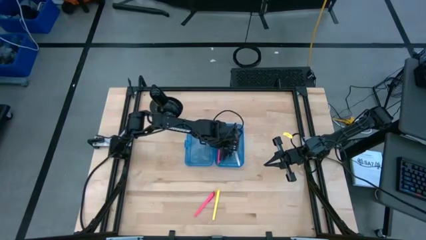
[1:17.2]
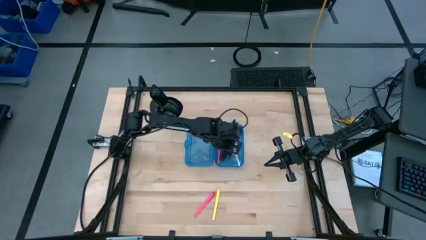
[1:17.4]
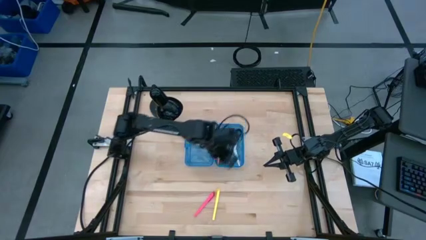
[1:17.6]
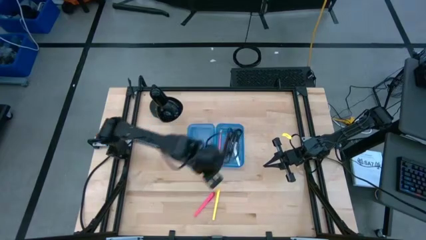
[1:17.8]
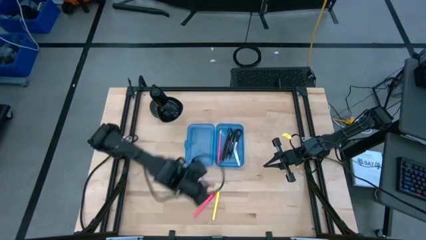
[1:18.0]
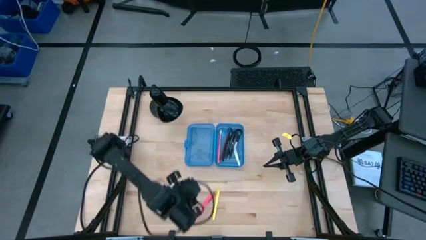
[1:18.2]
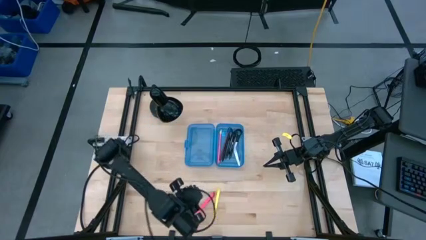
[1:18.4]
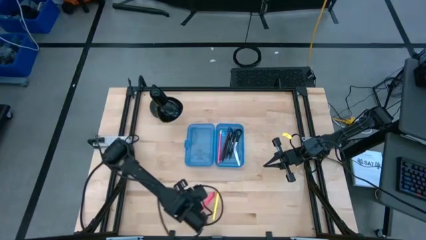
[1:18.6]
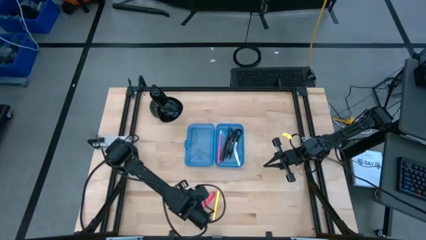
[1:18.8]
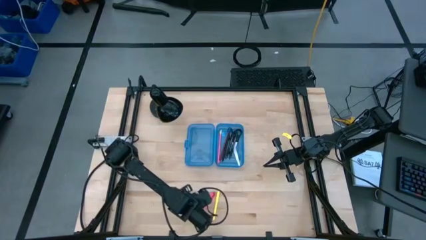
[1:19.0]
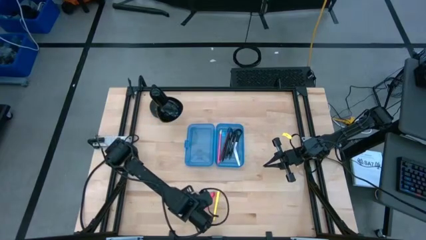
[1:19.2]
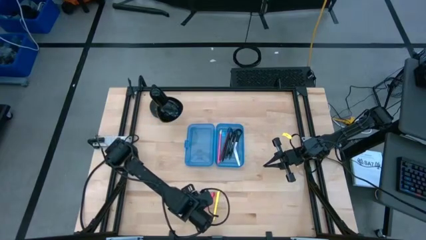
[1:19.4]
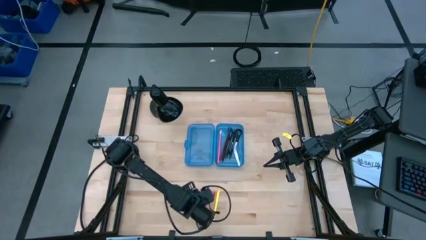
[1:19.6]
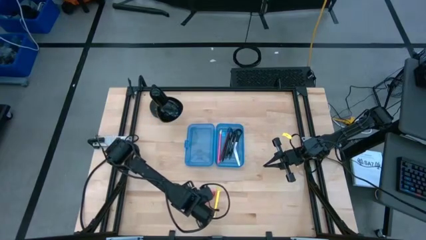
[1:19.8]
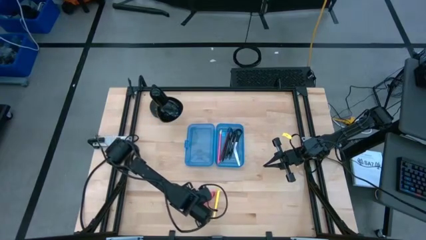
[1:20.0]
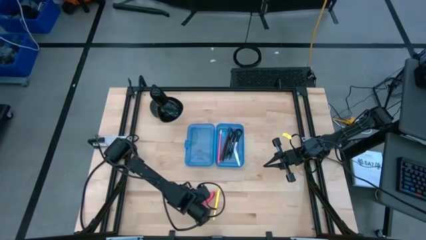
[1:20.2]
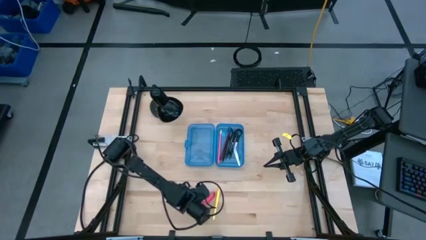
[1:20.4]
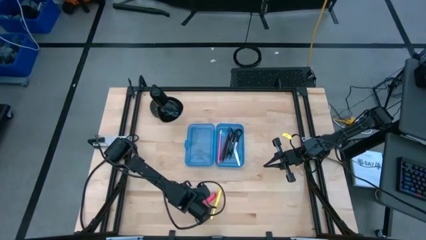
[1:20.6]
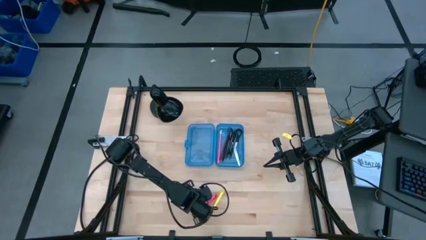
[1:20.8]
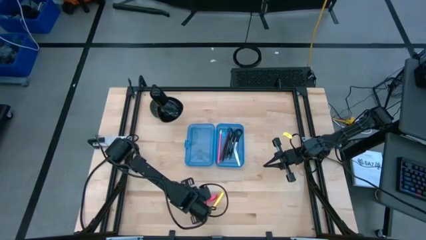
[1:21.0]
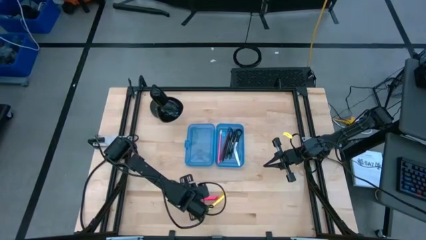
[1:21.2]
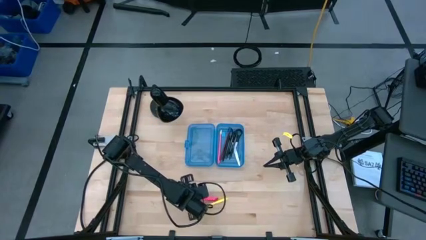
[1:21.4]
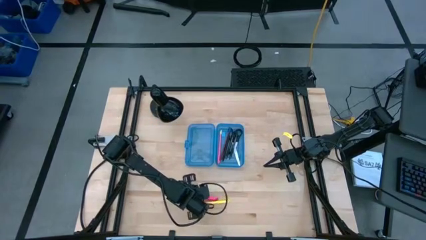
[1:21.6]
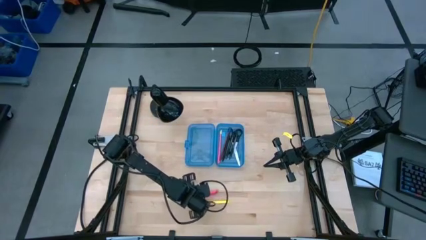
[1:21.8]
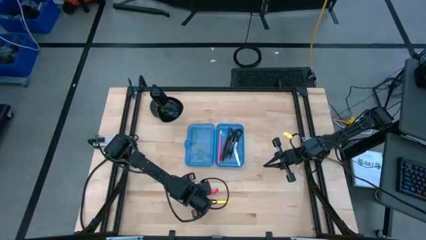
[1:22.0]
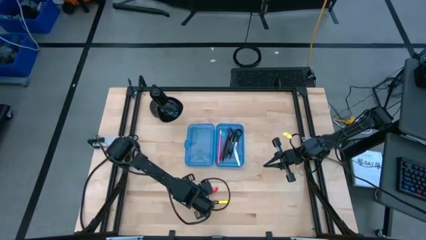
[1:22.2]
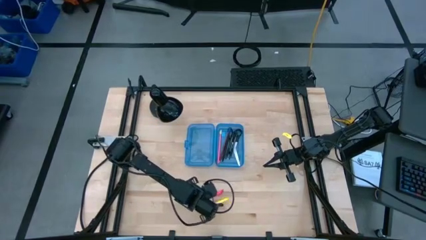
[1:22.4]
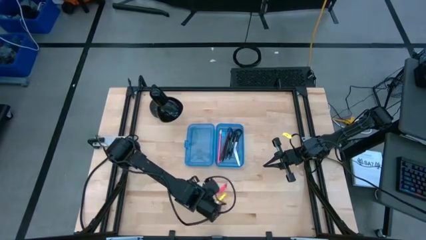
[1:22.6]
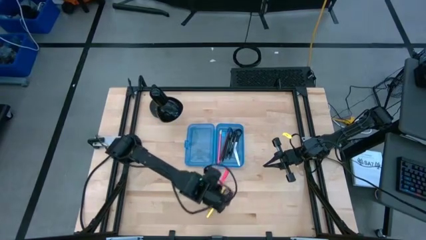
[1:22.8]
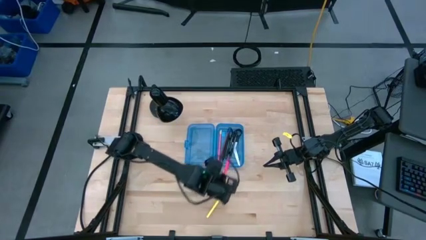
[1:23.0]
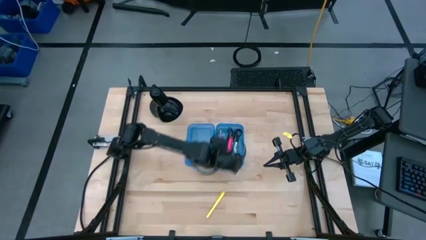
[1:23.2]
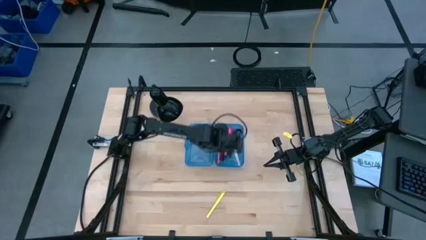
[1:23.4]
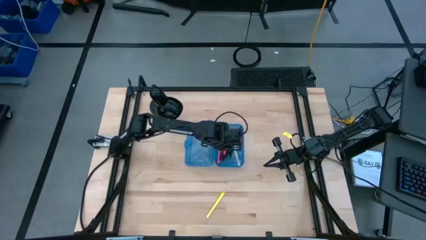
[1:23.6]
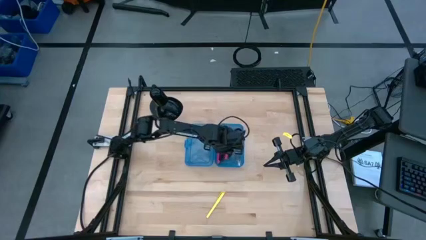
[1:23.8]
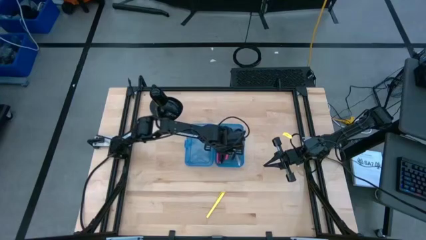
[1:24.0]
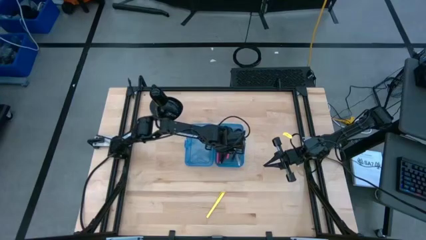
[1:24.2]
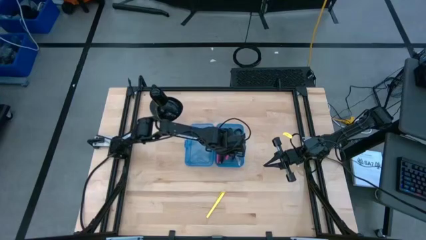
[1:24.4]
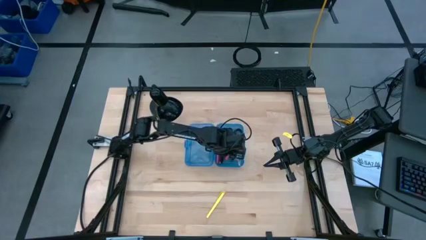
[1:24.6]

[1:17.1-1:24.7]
Task: Pick & place school supplies into a supply box
Put the pink pen into the supply box

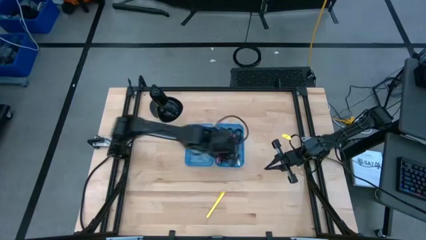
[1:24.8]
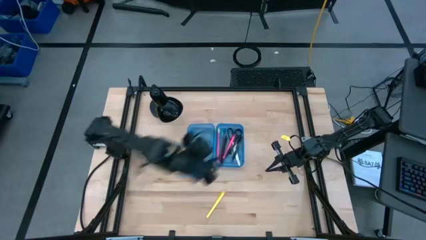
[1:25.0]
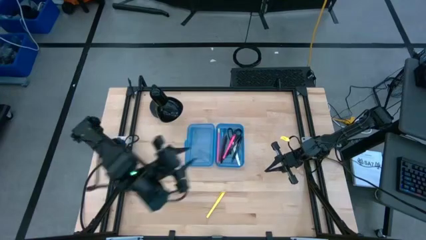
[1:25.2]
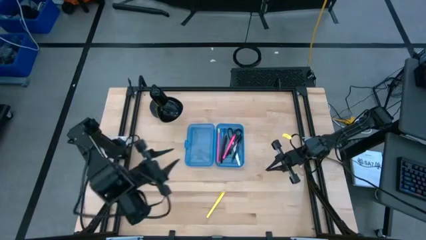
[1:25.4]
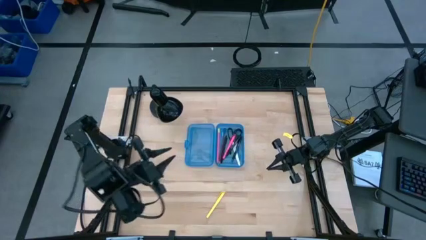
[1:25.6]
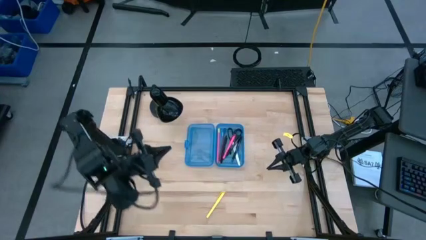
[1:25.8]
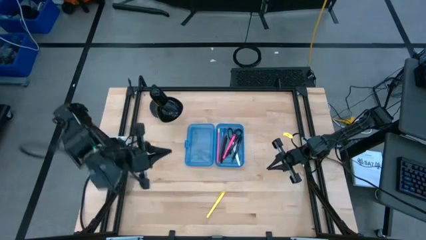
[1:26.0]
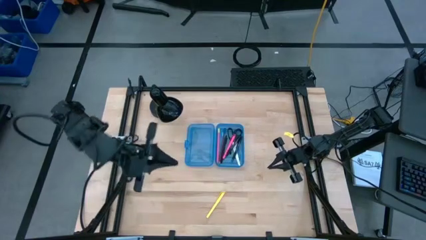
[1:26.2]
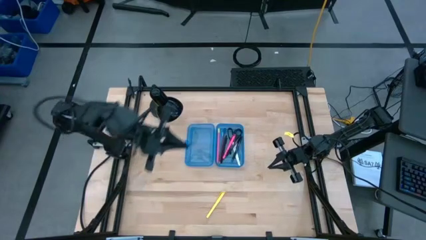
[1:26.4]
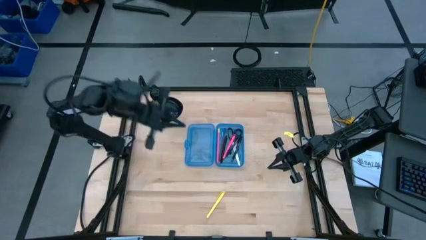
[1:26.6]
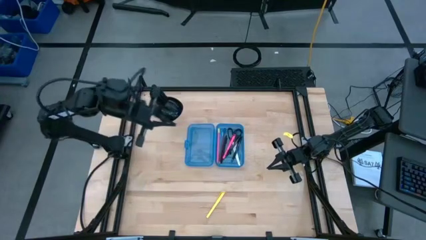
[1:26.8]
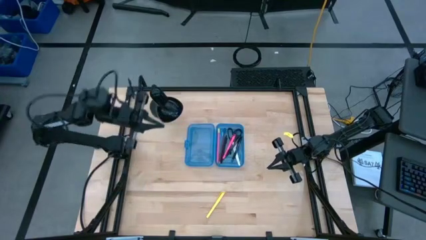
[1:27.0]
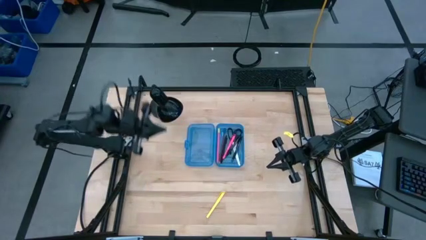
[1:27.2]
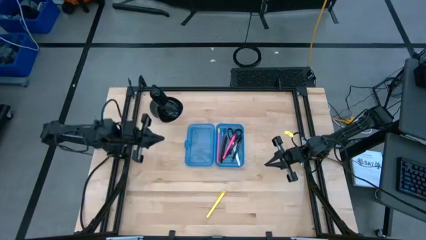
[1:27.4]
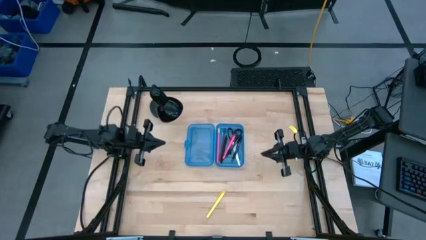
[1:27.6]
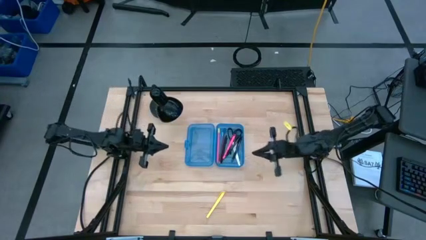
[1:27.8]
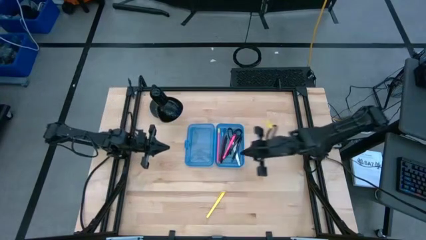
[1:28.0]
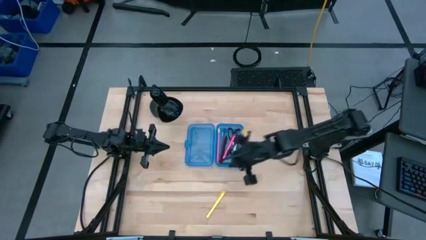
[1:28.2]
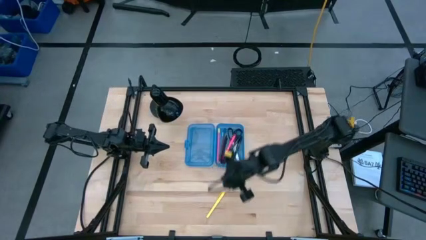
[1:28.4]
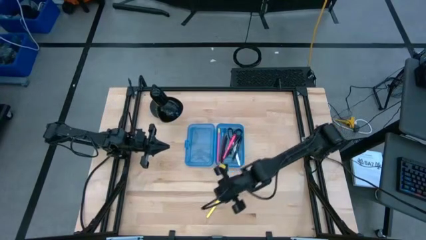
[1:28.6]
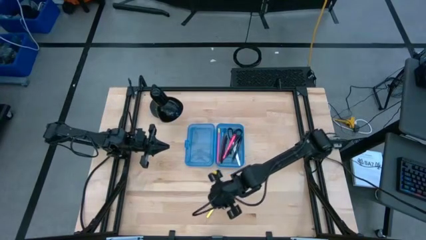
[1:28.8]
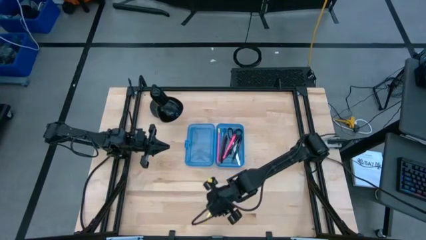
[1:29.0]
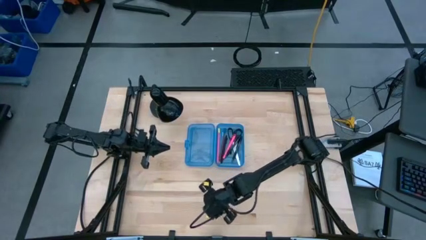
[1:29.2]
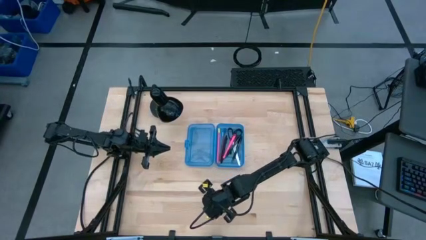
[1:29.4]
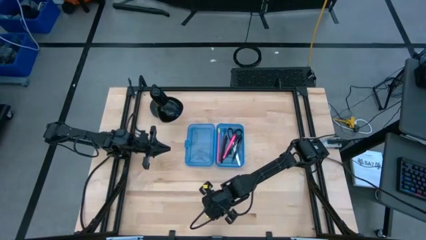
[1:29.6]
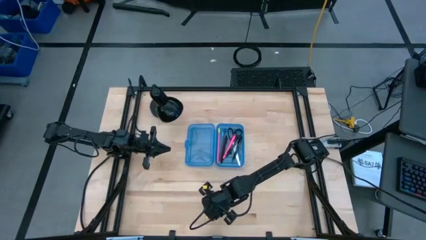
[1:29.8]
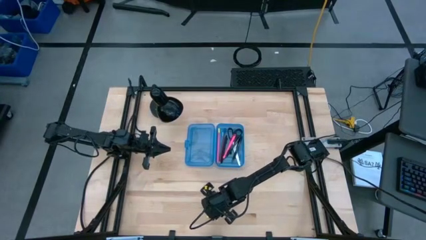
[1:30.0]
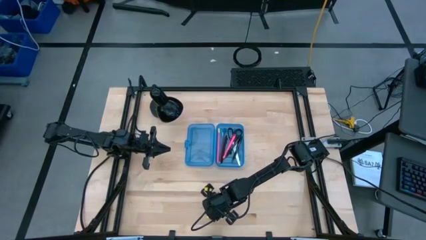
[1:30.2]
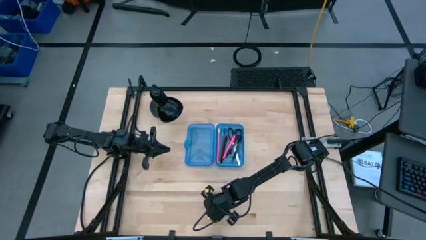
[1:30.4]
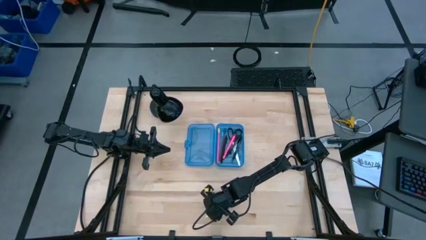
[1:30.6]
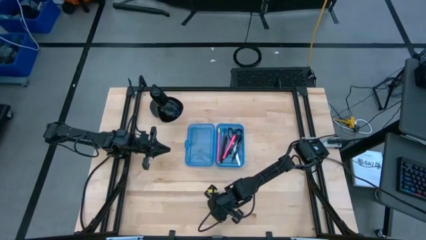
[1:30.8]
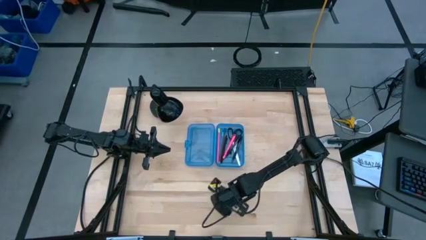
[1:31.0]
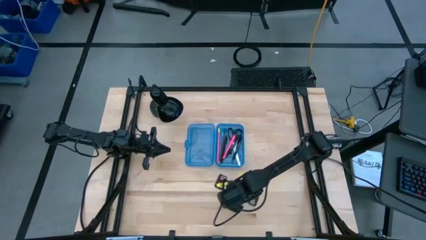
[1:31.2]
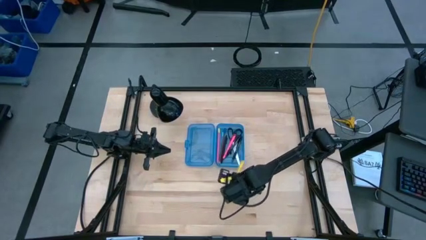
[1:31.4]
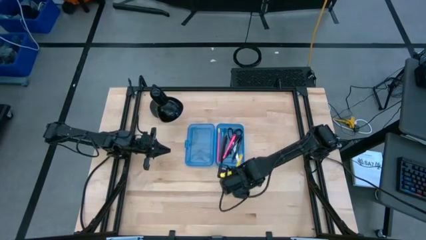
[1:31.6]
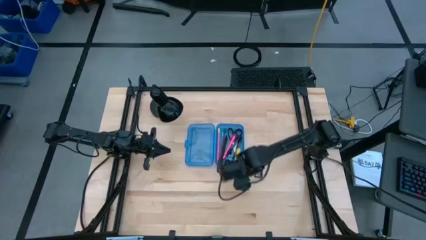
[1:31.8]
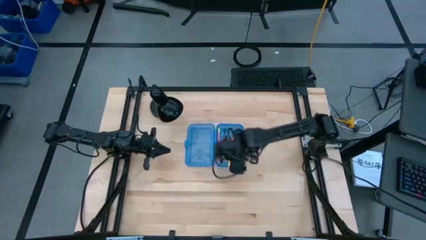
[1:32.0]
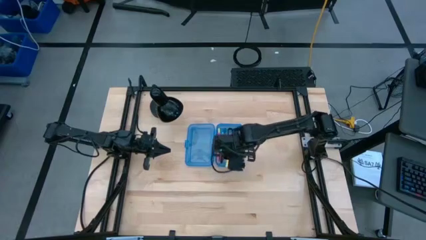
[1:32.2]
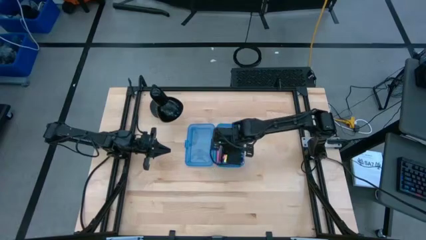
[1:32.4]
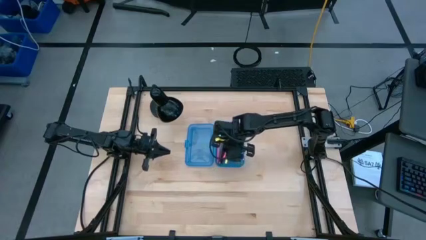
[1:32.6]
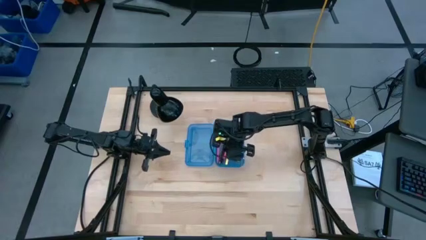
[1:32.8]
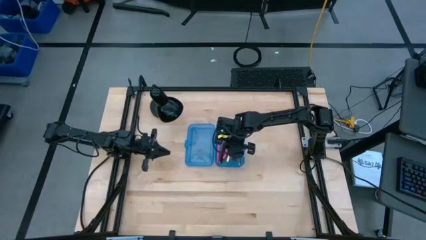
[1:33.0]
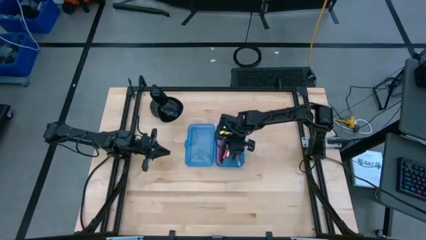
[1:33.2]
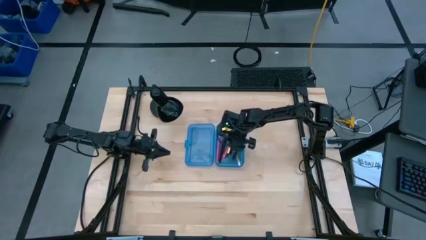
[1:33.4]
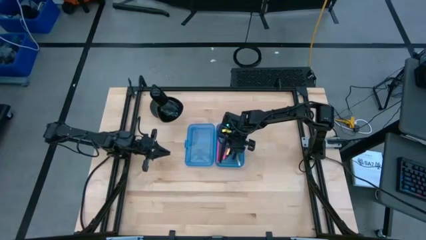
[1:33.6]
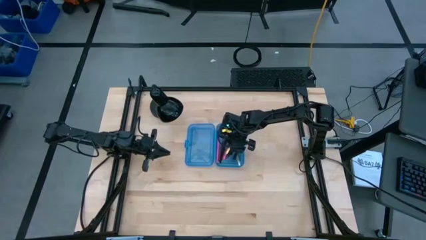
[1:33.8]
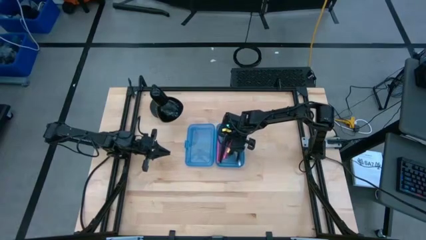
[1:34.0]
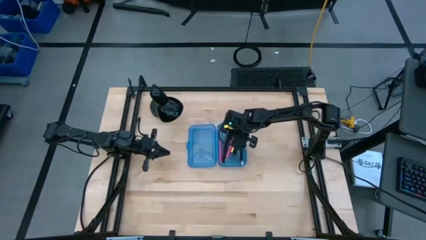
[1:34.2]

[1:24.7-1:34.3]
Put the yellow ball pen into the supply box

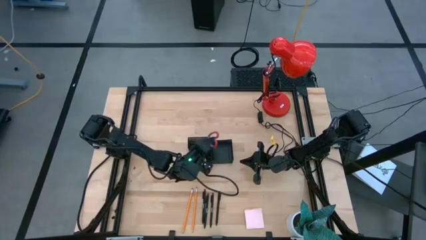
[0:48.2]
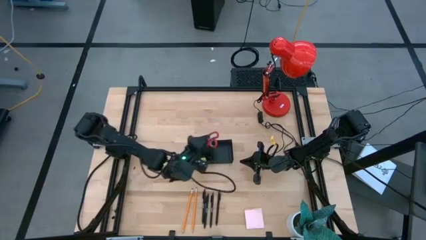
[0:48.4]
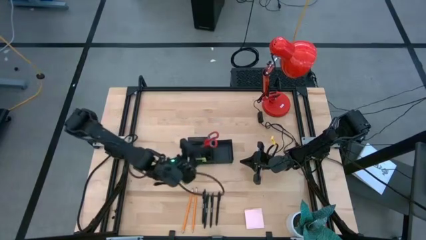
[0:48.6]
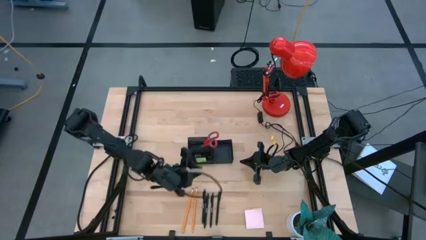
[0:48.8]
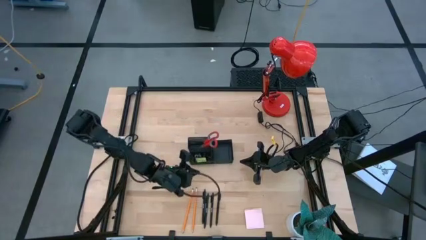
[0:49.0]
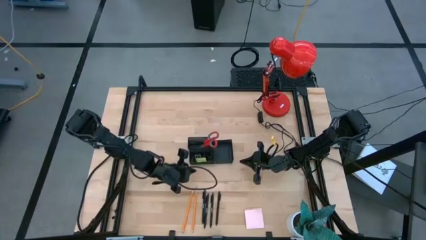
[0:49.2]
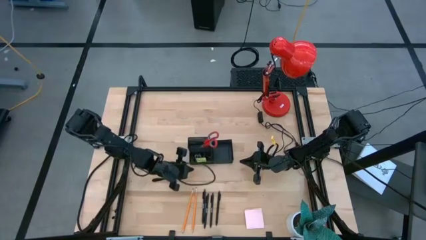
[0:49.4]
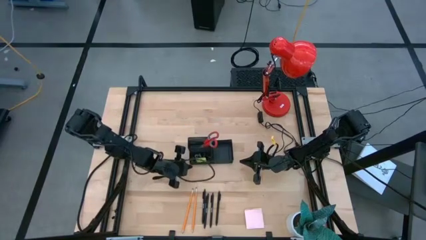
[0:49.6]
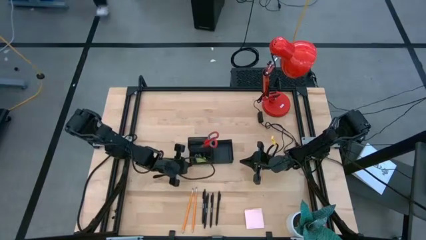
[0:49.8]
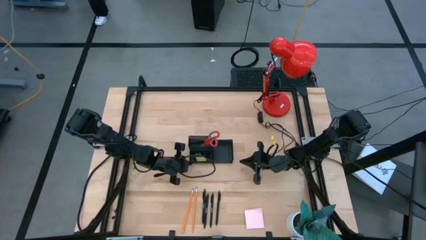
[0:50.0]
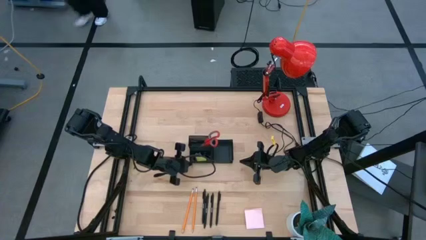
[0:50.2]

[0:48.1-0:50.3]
Task: Pick and place office supplies into organizer
Adjust the black desk organizer
